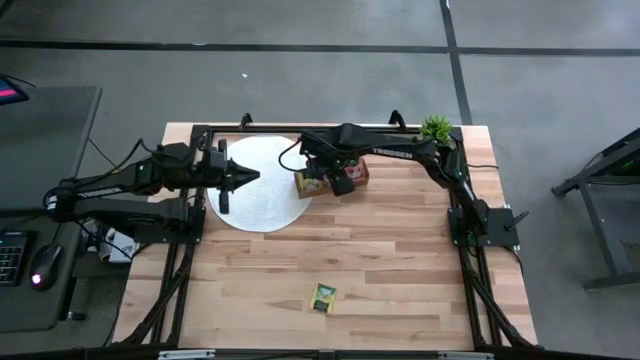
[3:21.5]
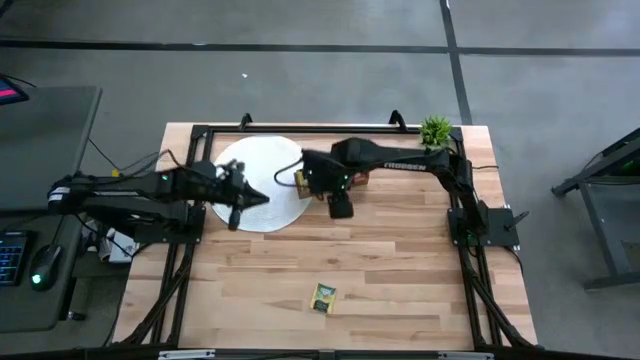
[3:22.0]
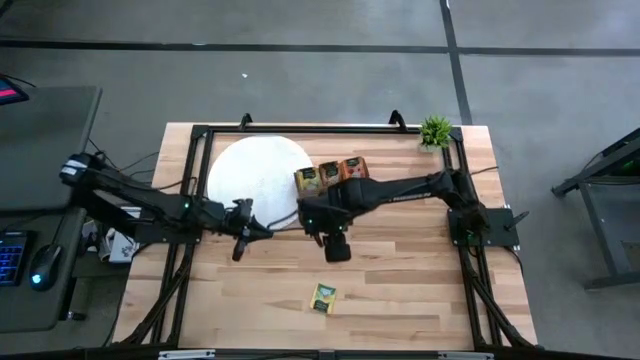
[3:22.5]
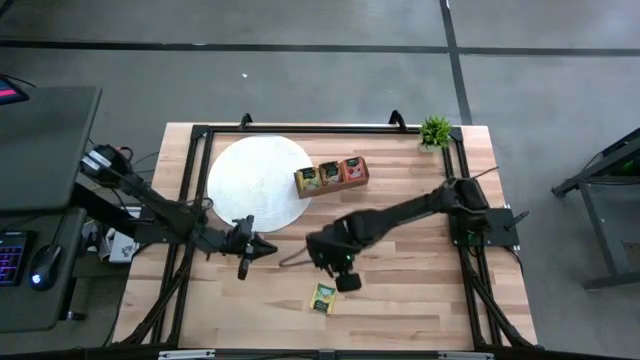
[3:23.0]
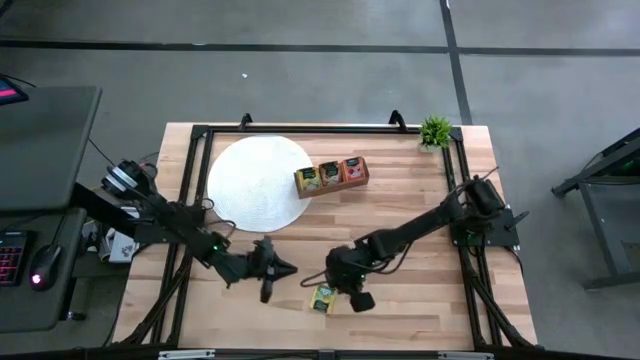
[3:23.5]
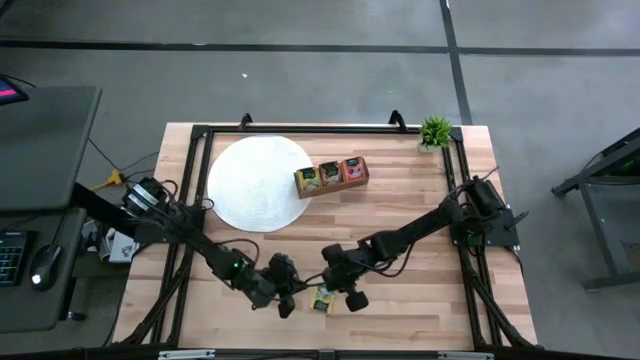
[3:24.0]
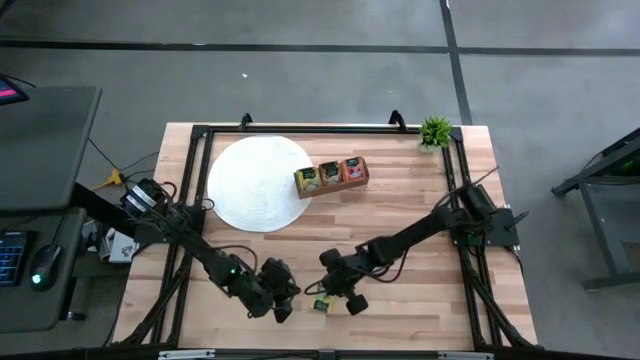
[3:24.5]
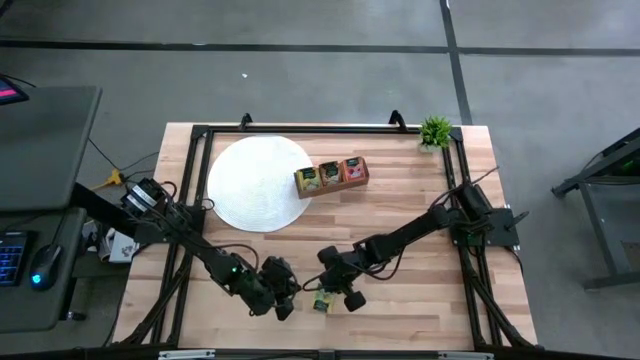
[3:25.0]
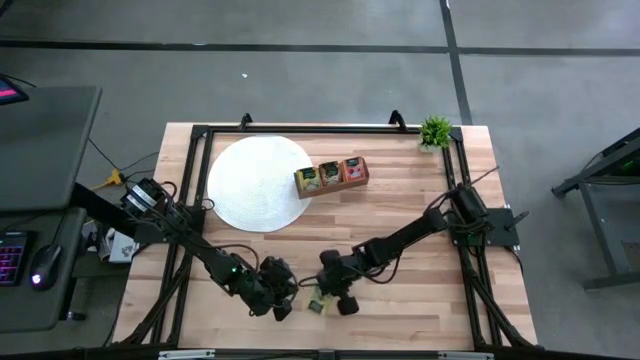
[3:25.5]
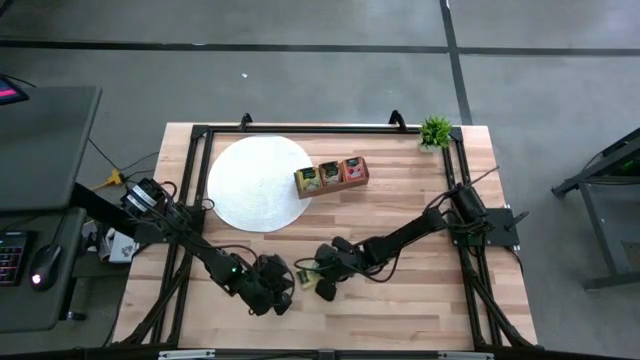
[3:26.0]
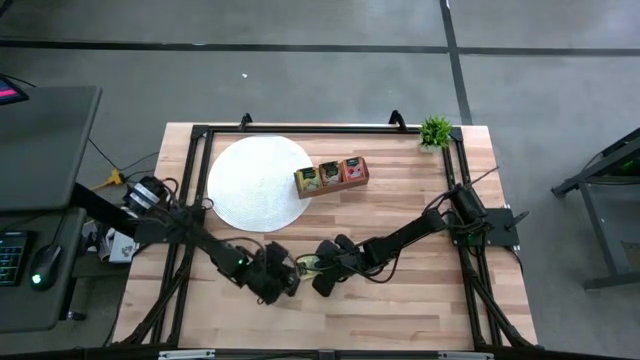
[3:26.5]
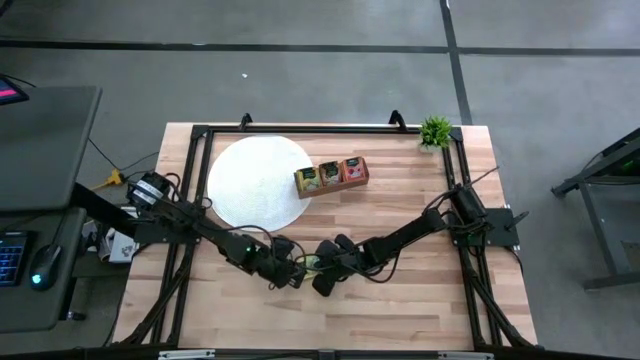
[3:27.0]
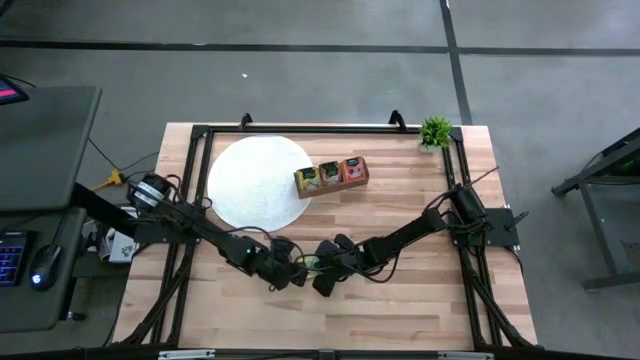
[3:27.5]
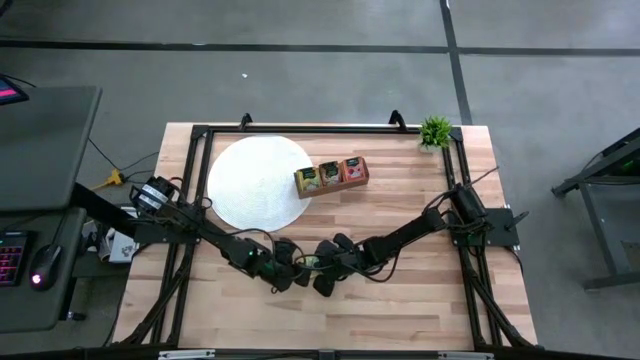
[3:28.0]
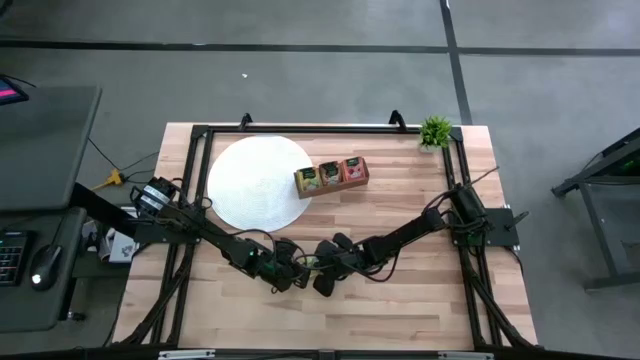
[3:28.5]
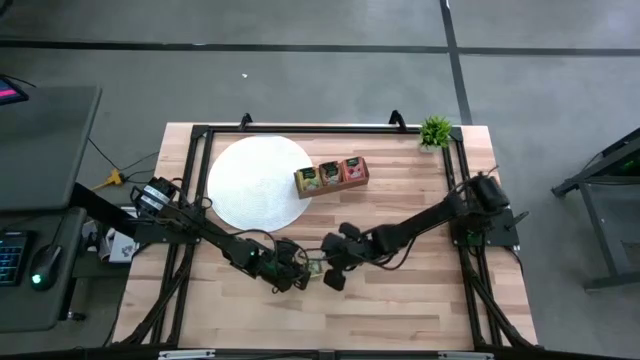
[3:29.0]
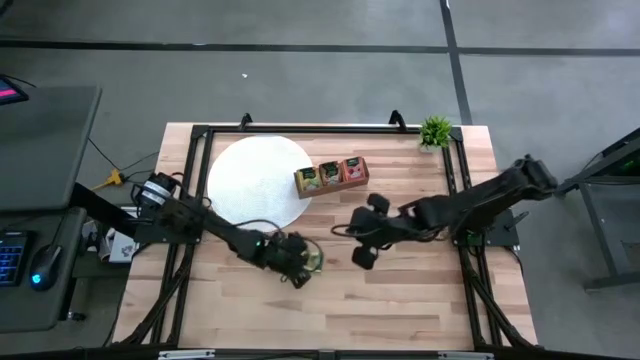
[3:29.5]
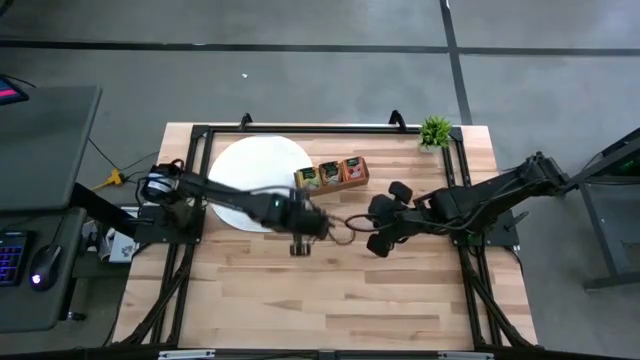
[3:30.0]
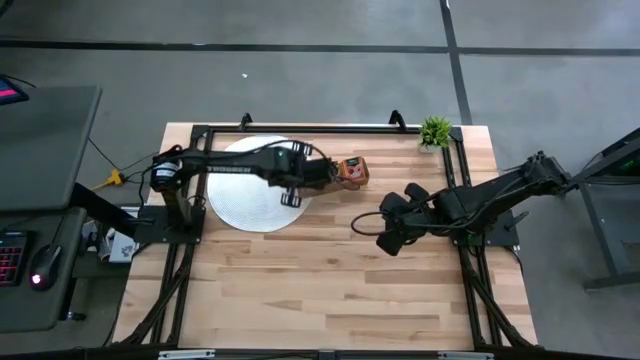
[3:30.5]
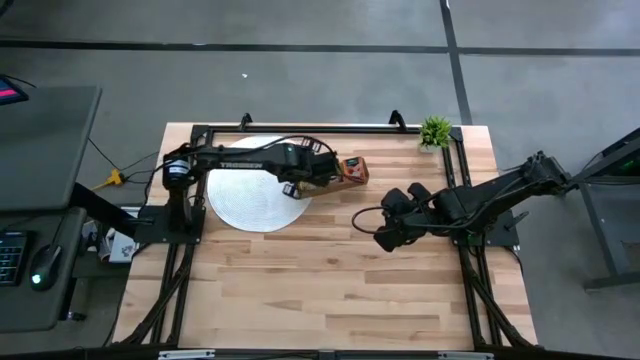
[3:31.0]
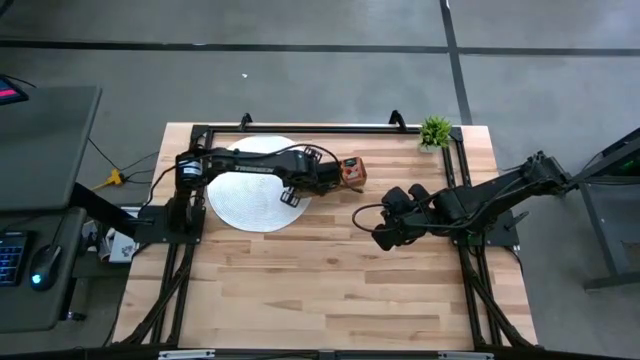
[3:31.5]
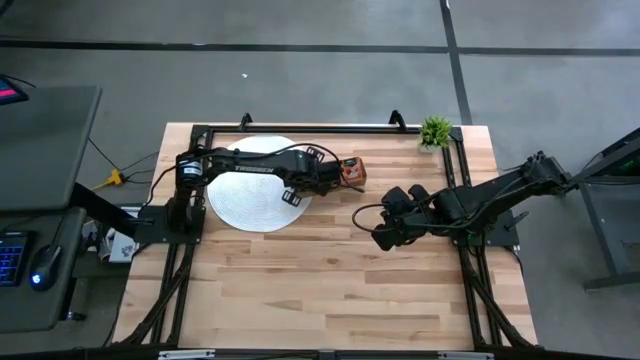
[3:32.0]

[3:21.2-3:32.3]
Task: Pick & Place Tea
Put the yellow tea bag into the left compartment of the wooden organizer

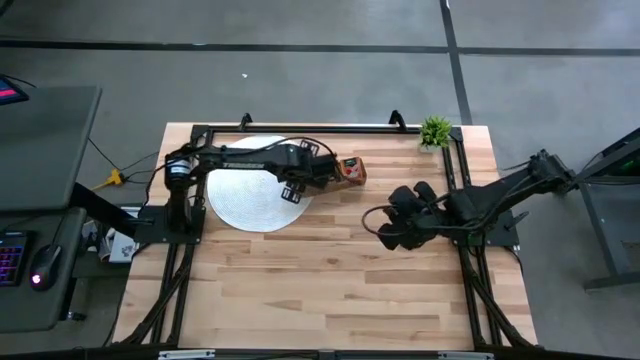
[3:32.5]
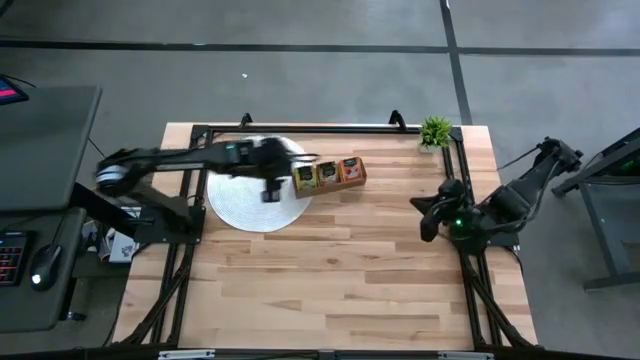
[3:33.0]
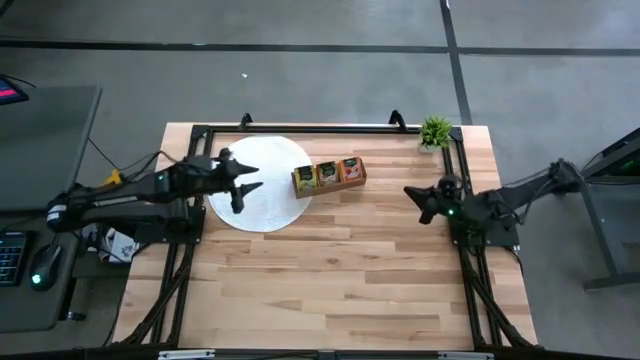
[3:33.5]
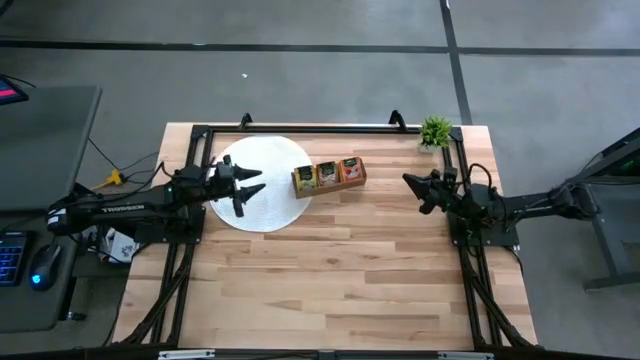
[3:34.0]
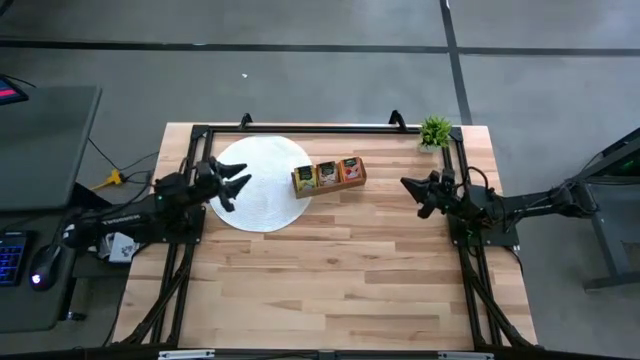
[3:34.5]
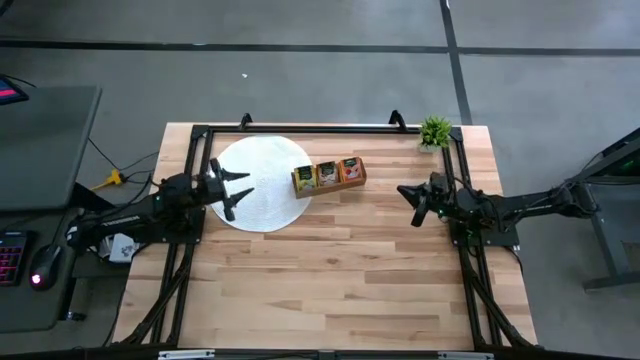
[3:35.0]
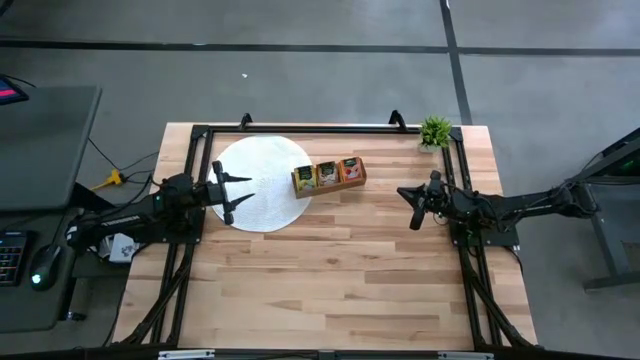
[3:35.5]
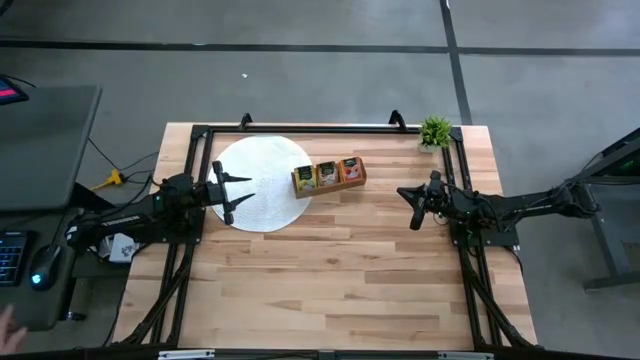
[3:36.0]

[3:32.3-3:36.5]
Return to Home Position

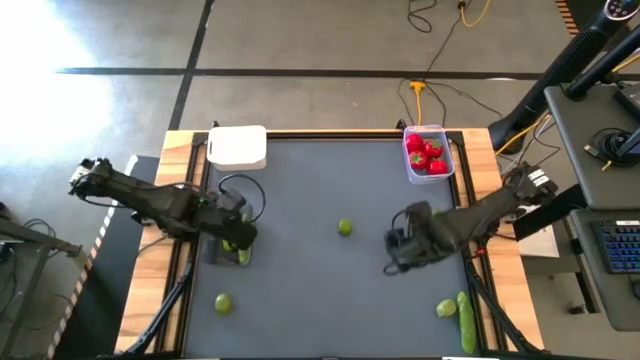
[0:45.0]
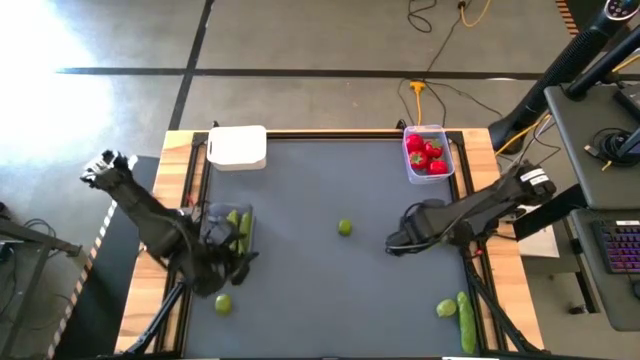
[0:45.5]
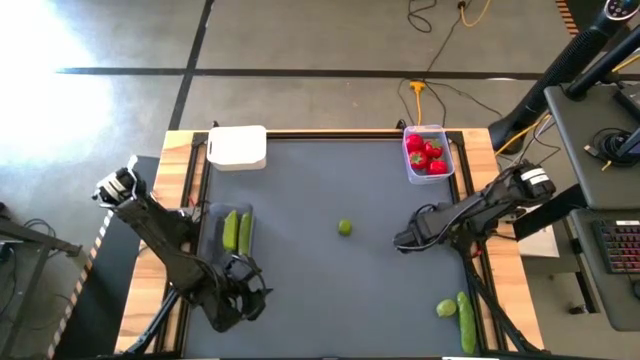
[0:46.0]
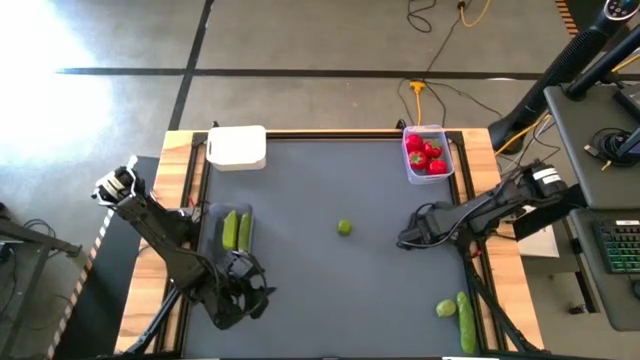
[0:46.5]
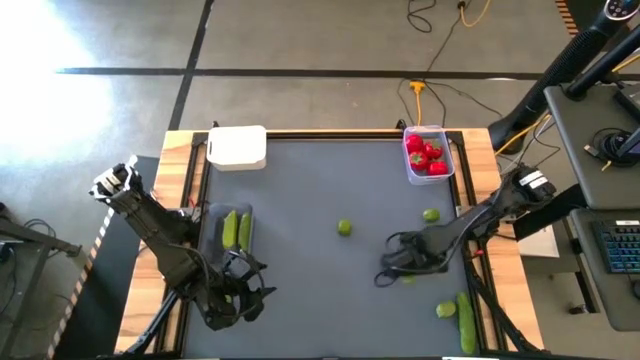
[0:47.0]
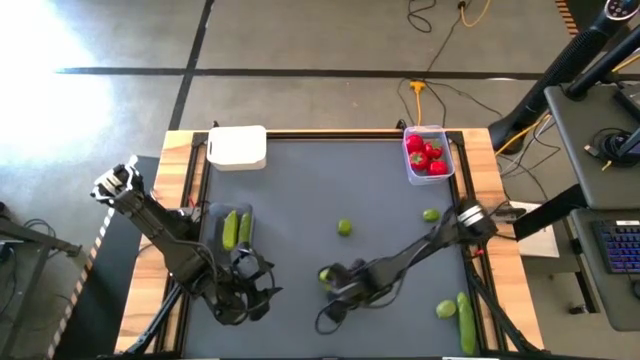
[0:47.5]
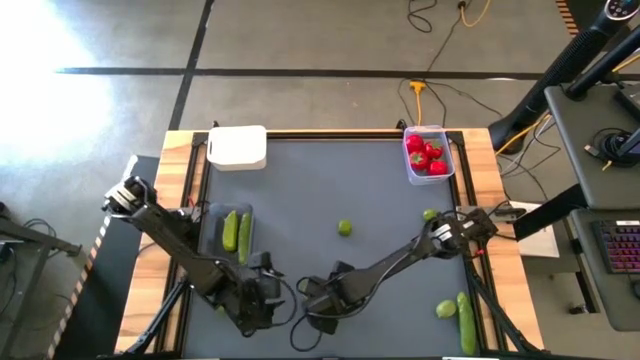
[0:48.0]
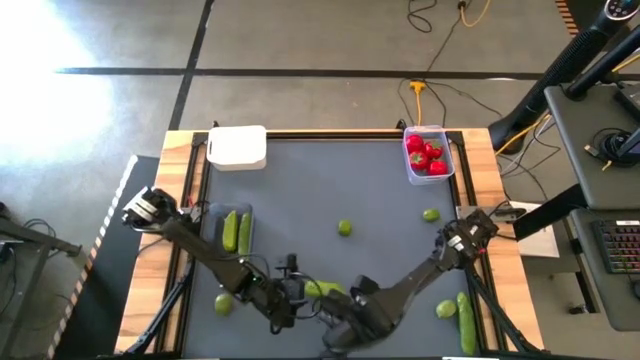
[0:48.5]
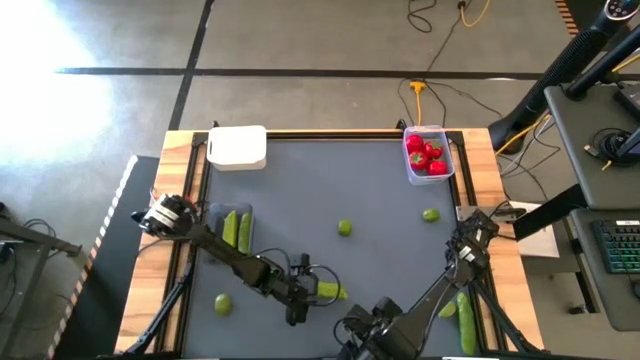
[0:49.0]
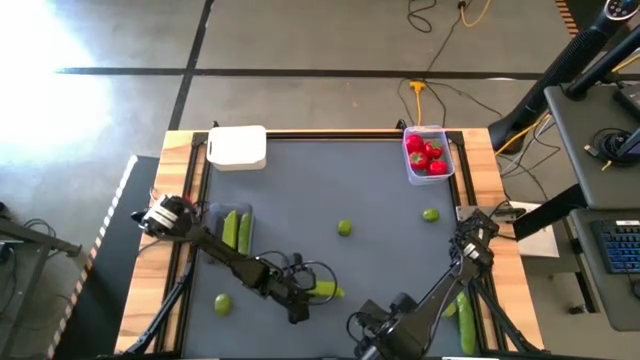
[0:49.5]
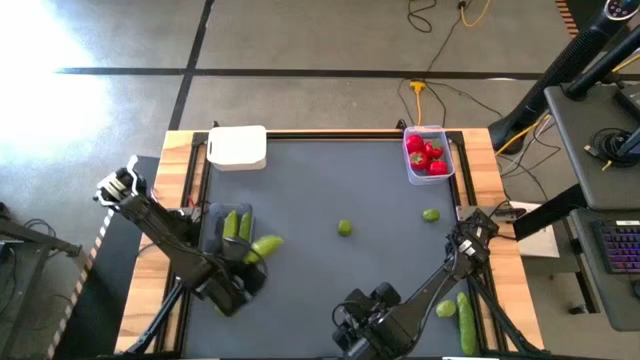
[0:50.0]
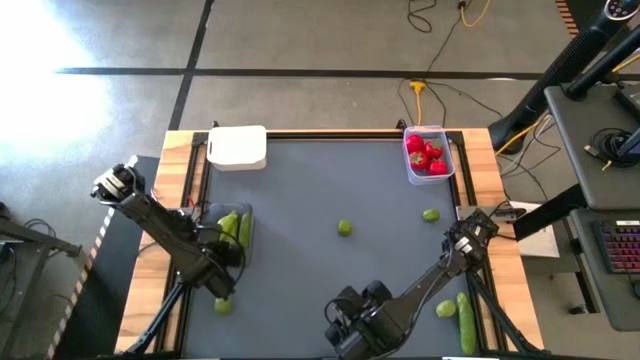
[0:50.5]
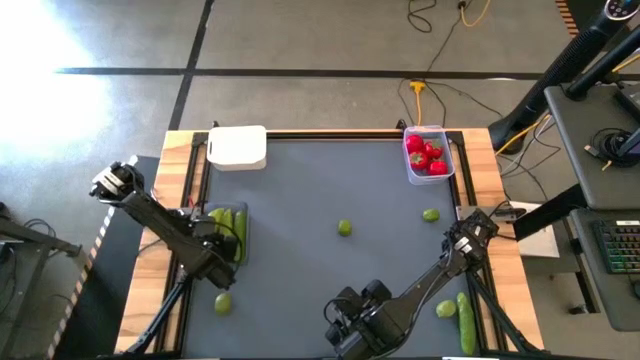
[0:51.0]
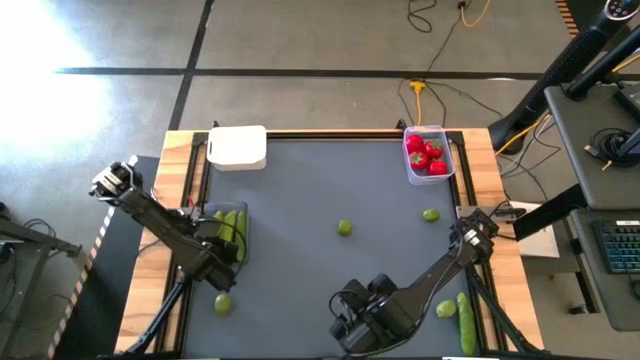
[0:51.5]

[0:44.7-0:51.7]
Task: Sort produce into baskets
Put the green cucumber into the black bin
